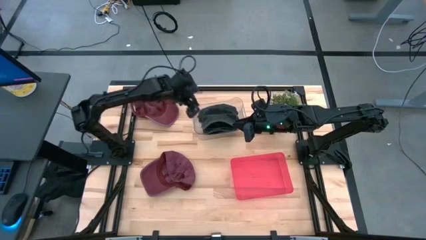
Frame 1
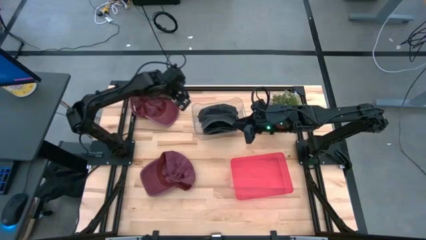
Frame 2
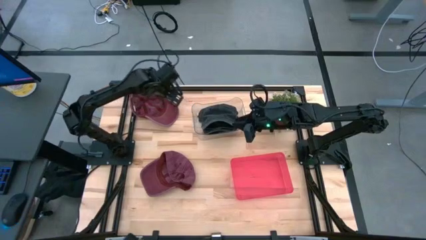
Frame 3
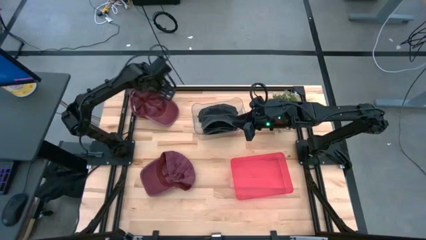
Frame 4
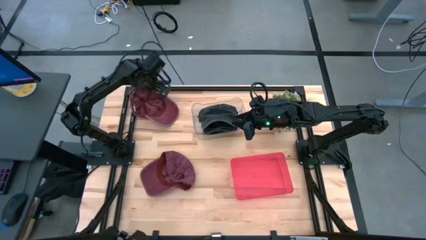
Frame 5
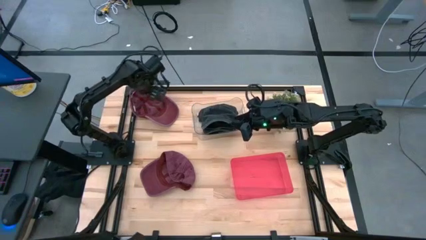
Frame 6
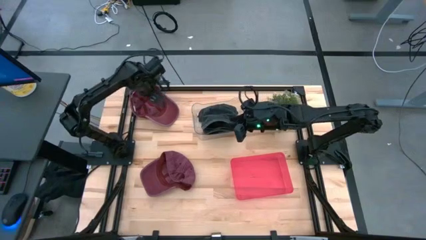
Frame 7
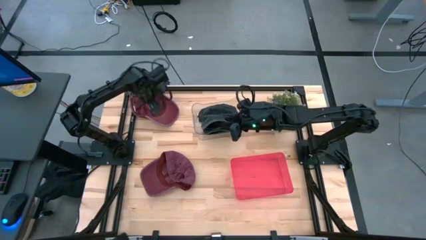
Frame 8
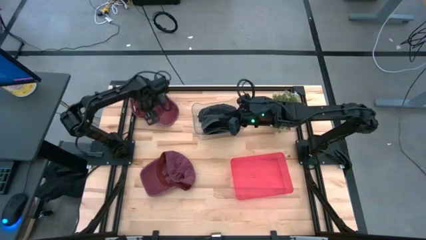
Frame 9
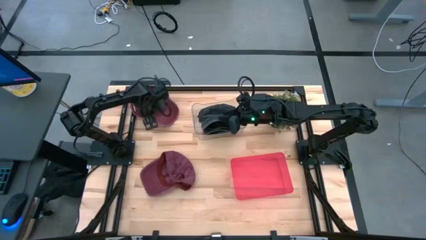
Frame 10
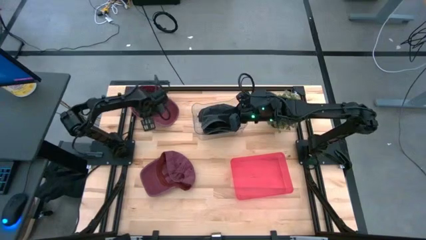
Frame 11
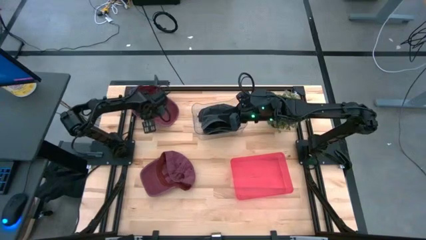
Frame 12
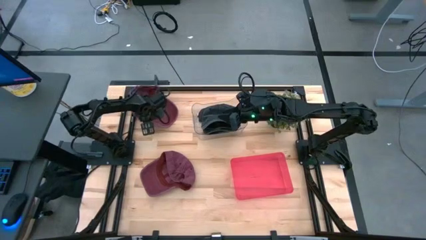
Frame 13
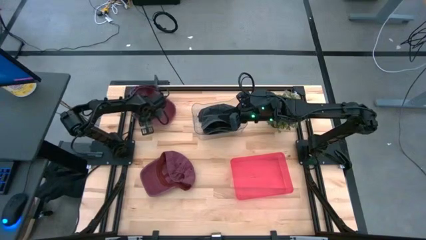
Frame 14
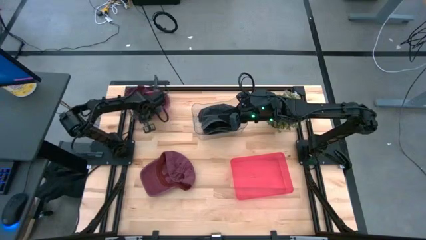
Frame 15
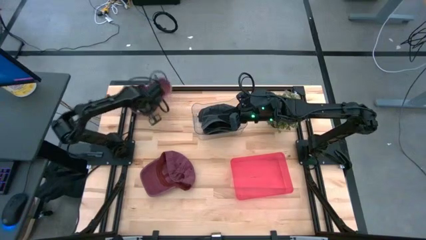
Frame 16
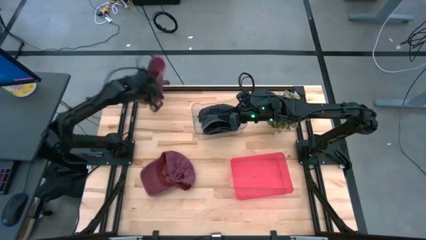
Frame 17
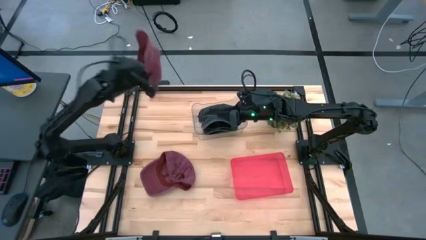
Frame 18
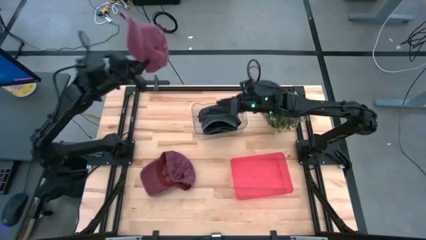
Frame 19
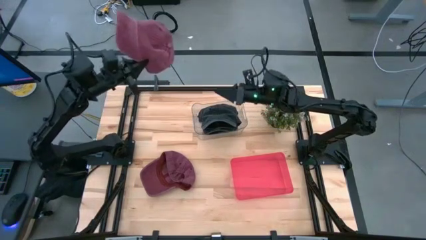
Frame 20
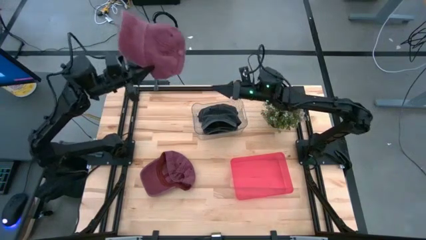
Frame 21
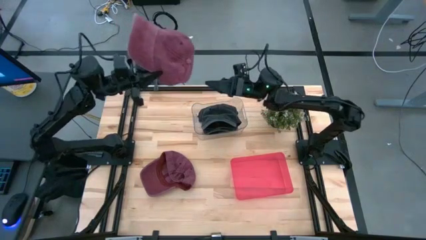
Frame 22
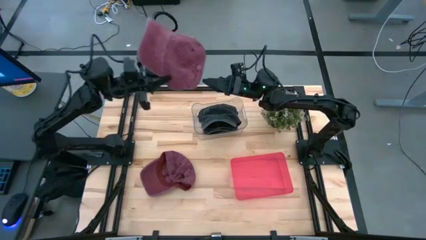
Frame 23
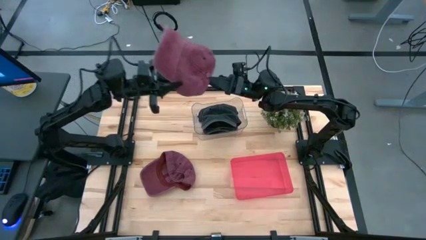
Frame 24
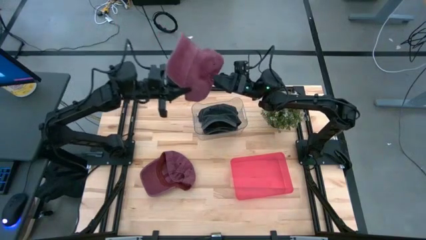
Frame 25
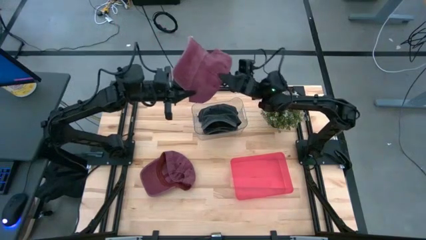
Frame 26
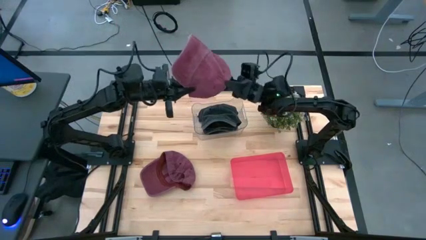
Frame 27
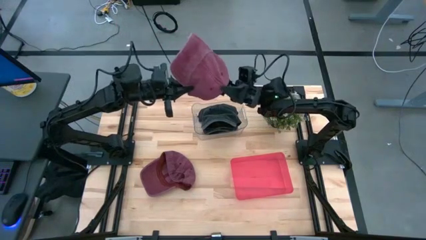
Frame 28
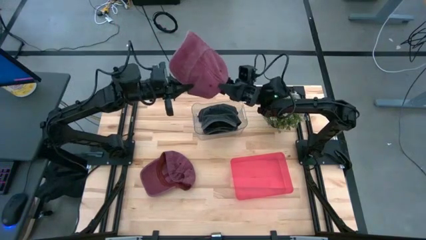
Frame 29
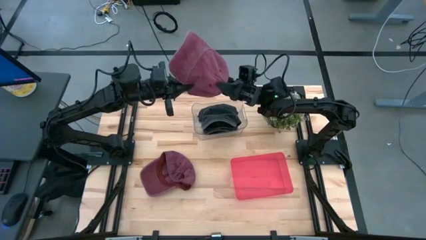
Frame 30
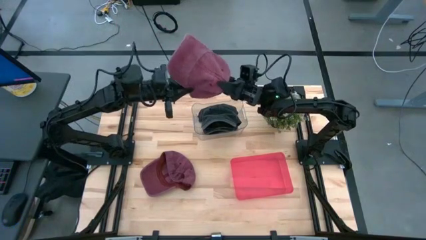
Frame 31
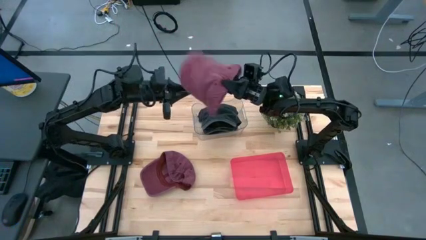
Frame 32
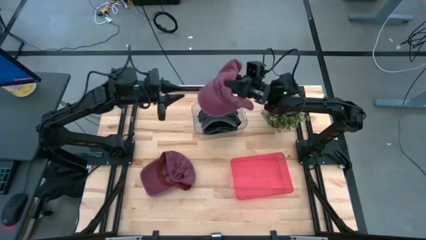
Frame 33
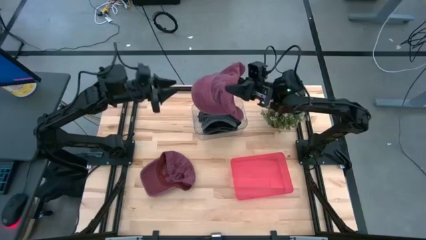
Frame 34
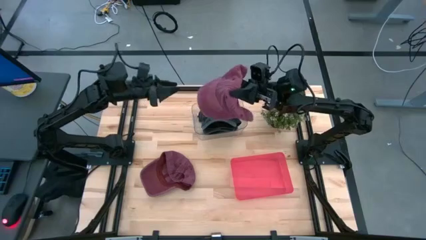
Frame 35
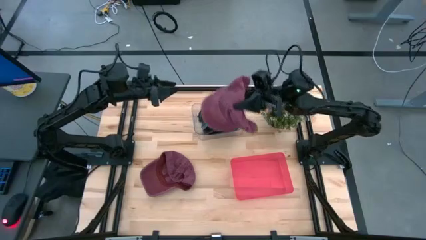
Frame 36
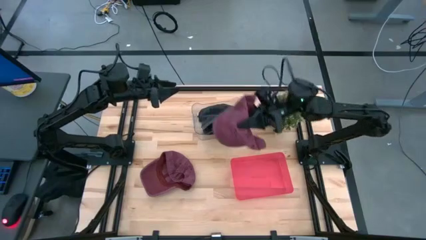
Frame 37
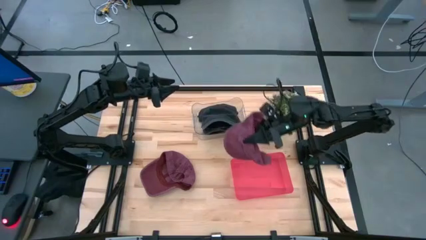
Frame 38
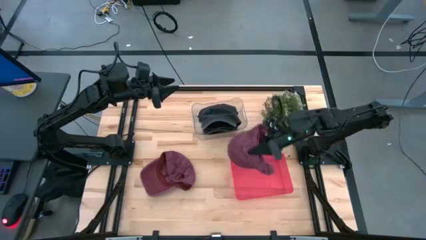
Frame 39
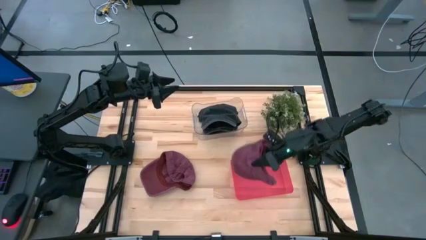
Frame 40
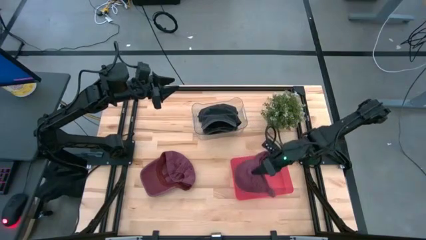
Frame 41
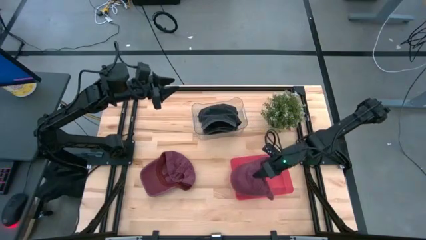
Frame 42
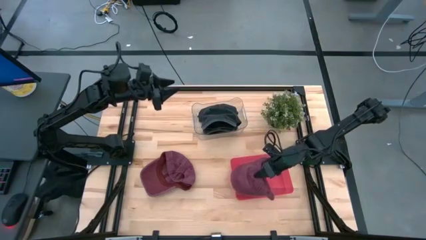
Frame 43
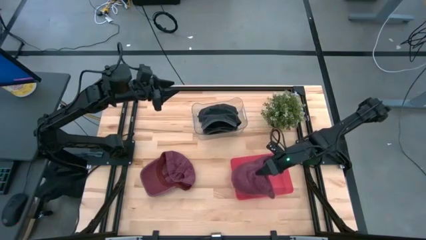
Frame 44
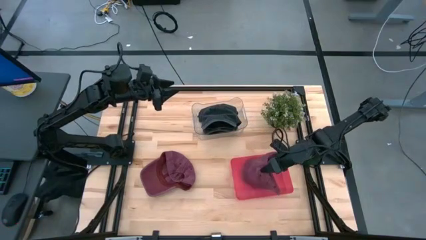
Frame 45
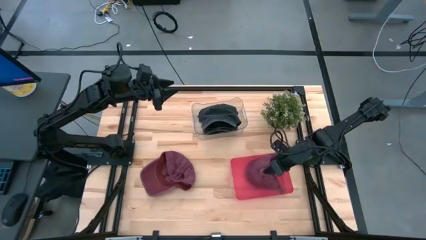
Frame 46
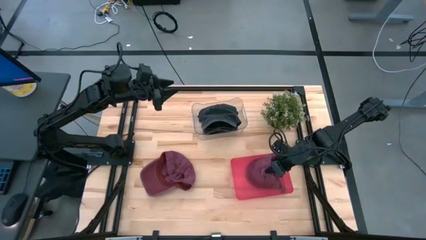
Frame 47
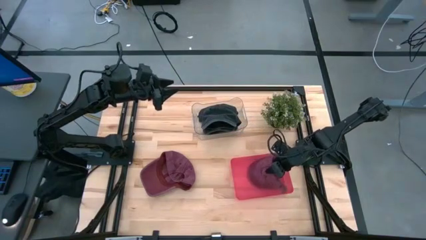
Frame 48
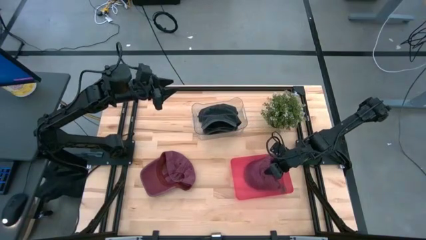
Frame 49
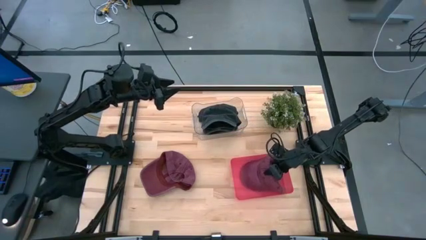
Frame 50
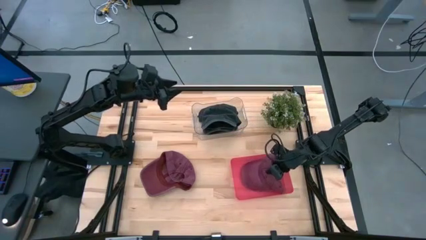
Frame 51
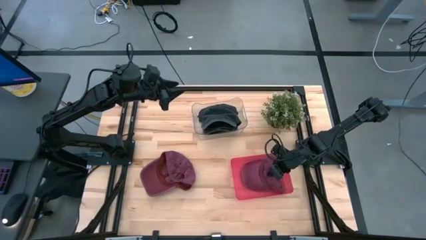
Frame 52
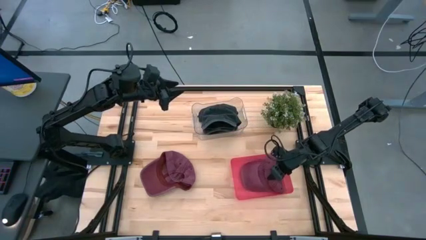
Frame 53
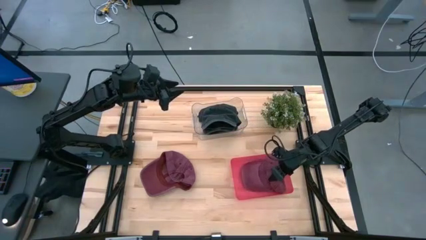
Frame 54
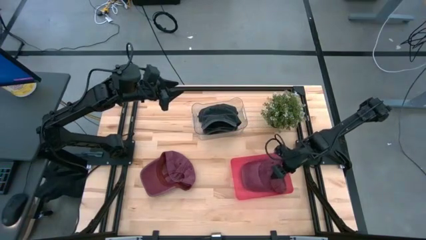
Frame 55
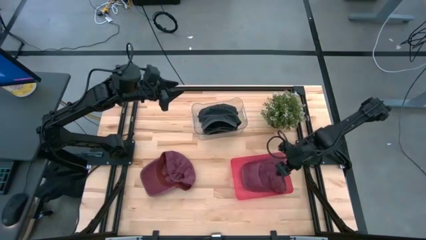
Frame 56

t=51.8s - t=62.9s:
Task: Pick & Place hat
Put the top red cap into the pink bin
